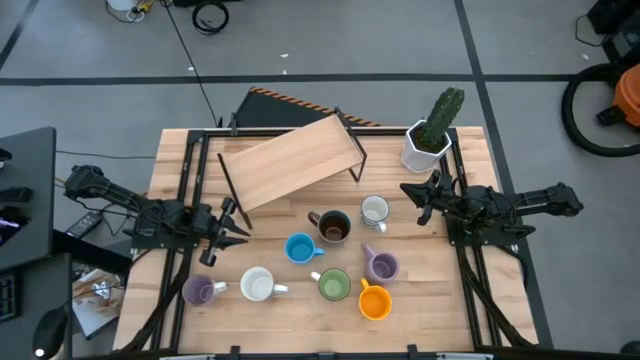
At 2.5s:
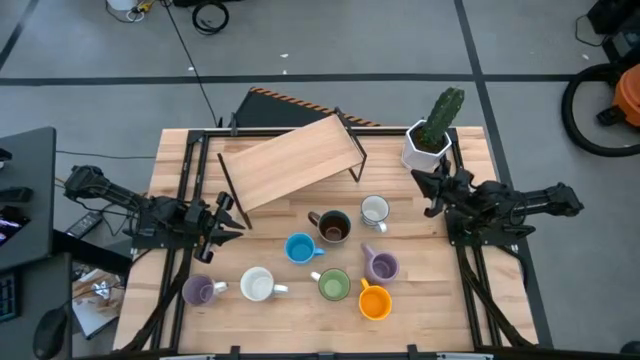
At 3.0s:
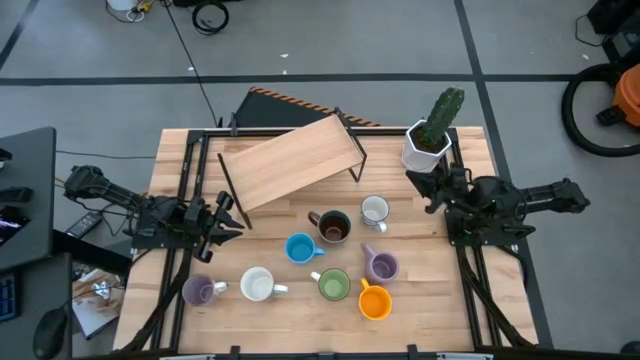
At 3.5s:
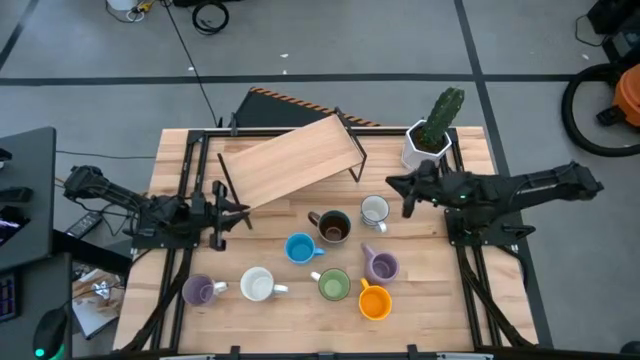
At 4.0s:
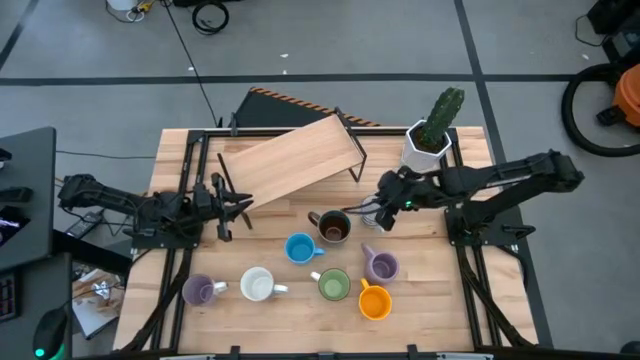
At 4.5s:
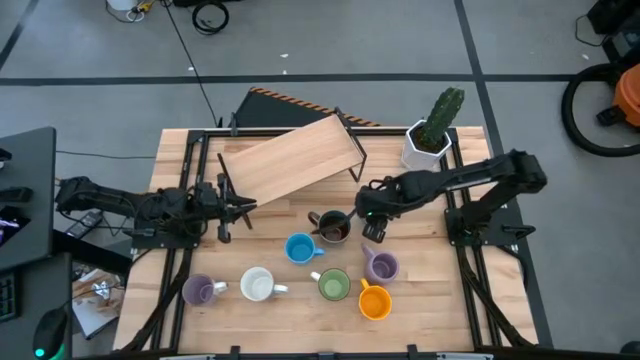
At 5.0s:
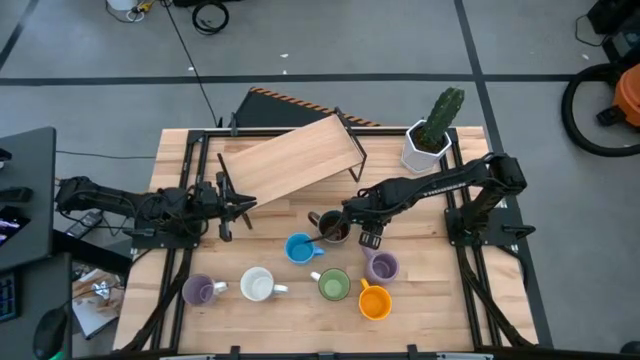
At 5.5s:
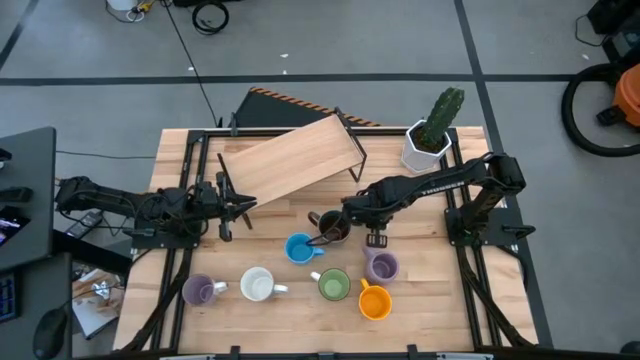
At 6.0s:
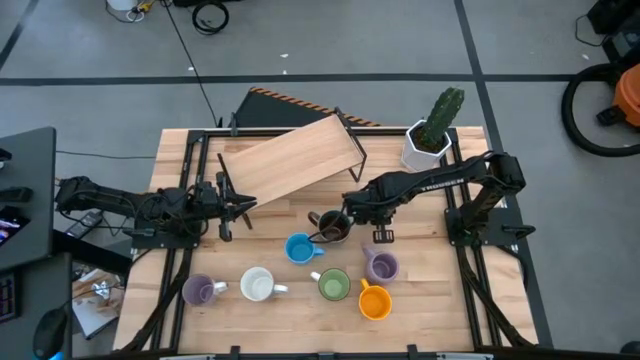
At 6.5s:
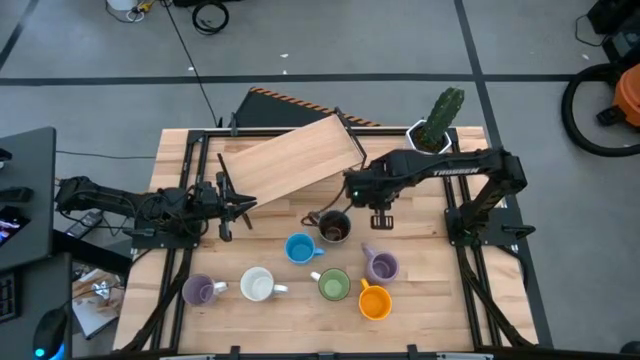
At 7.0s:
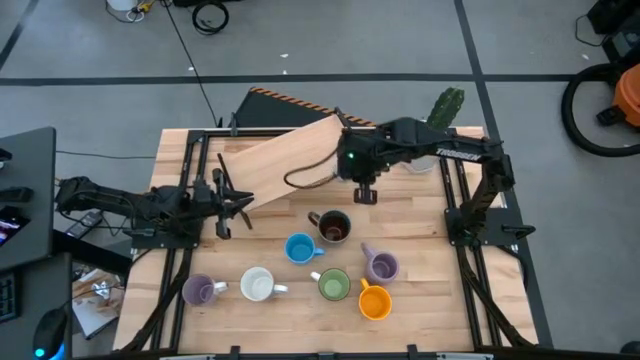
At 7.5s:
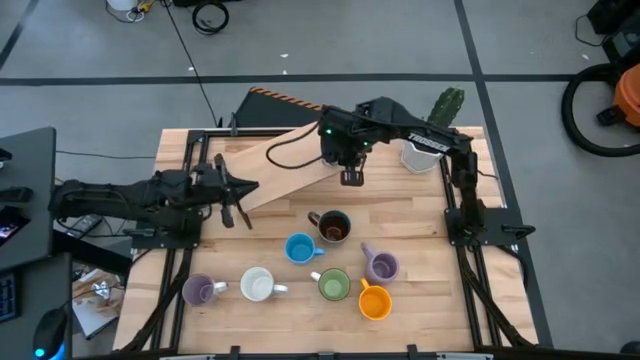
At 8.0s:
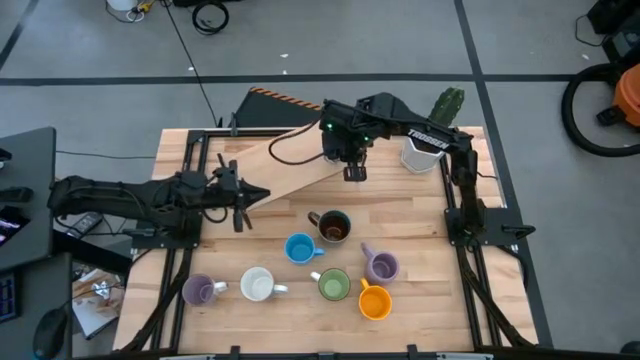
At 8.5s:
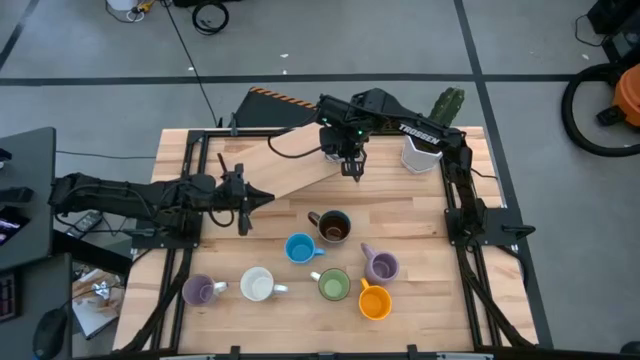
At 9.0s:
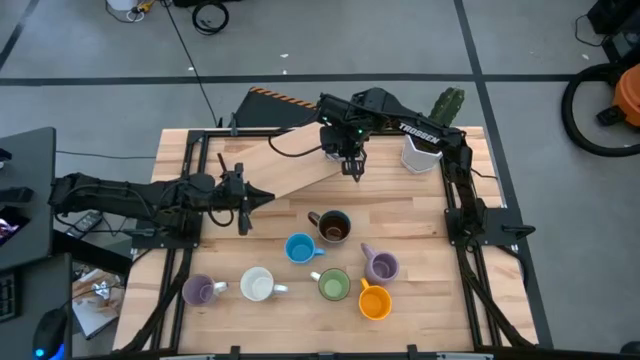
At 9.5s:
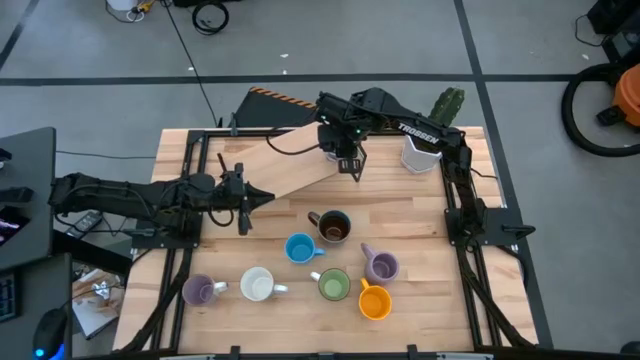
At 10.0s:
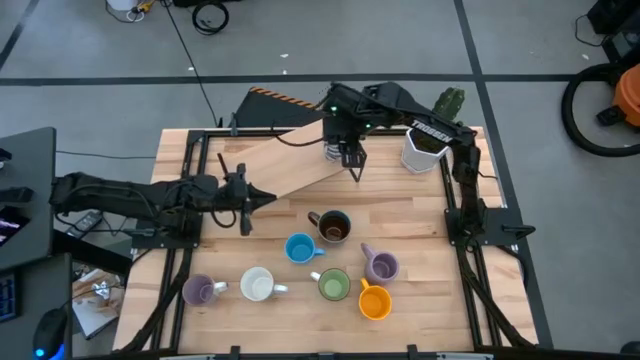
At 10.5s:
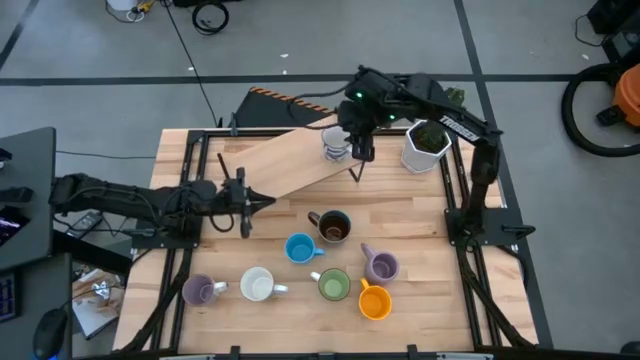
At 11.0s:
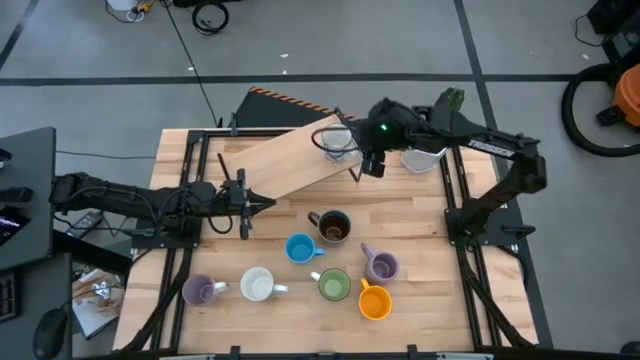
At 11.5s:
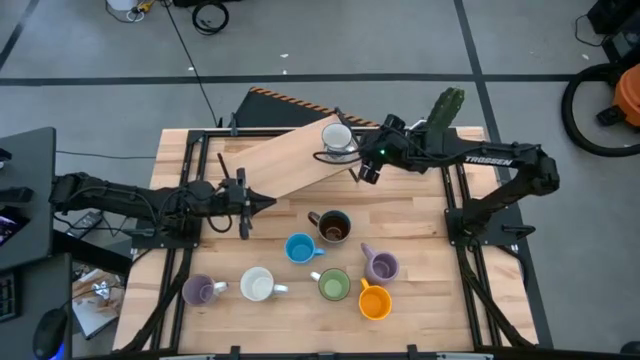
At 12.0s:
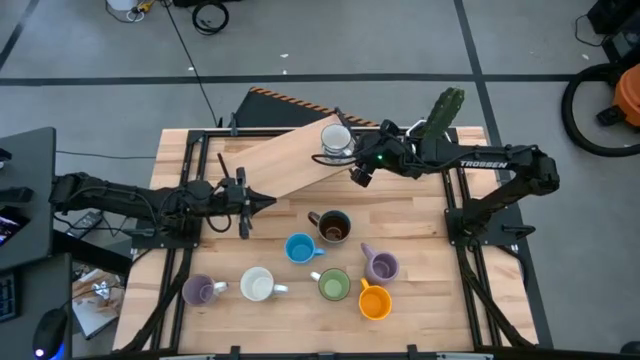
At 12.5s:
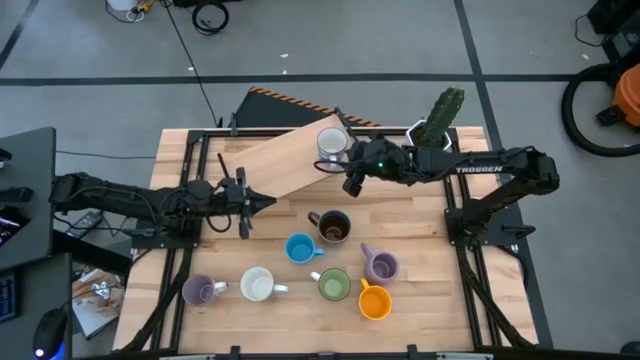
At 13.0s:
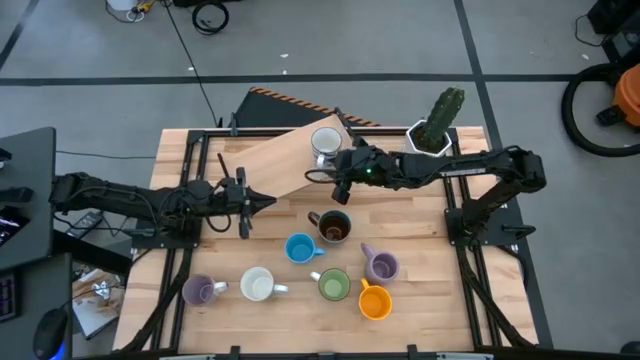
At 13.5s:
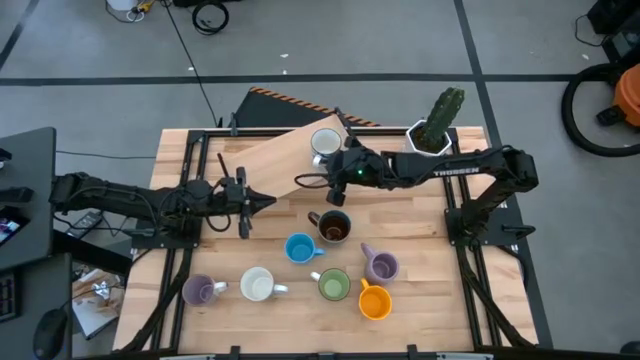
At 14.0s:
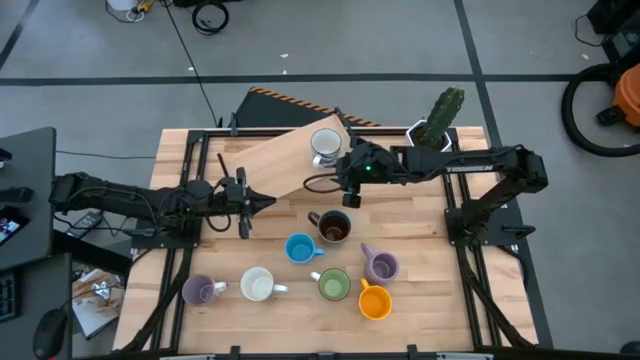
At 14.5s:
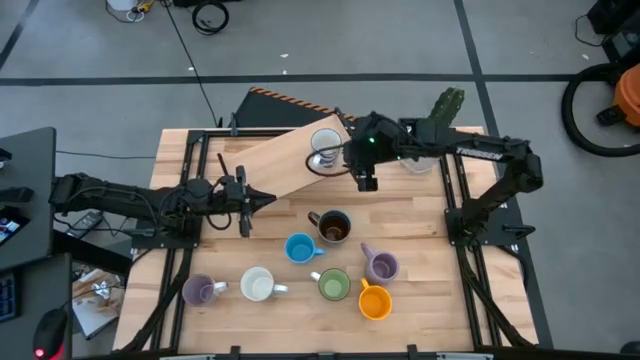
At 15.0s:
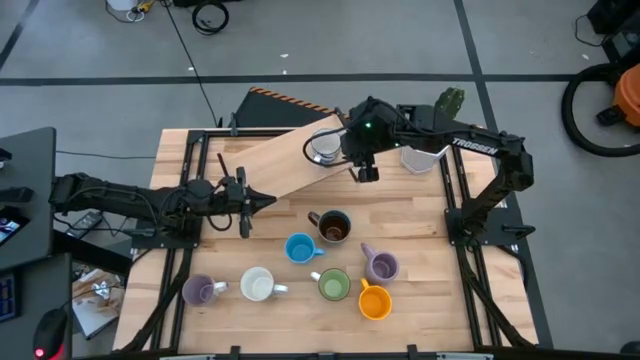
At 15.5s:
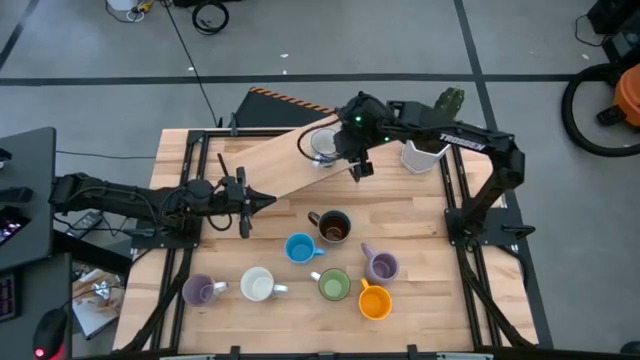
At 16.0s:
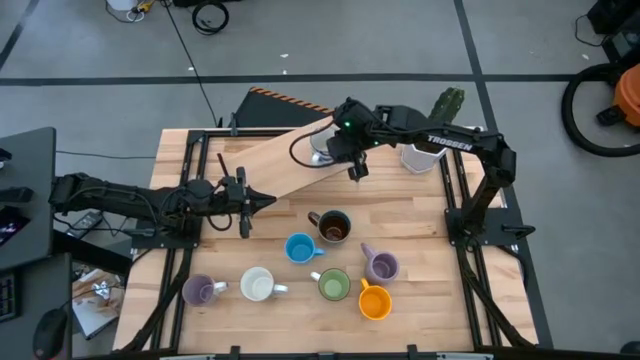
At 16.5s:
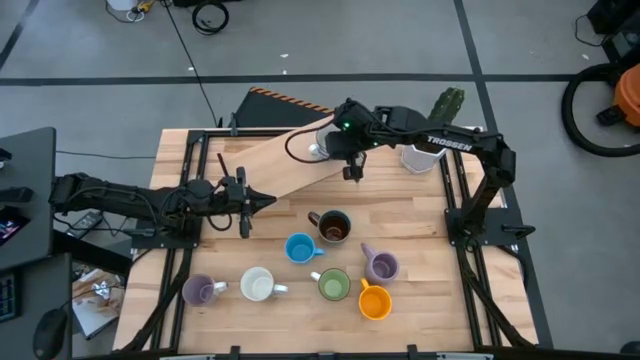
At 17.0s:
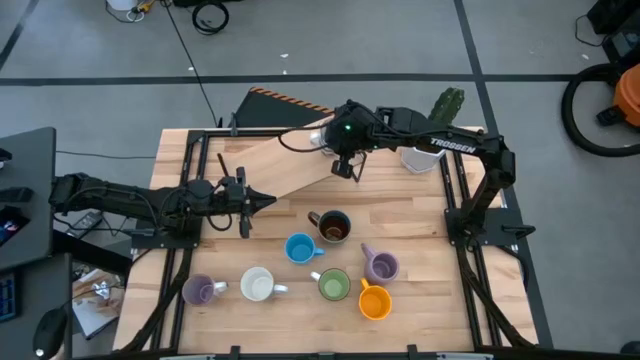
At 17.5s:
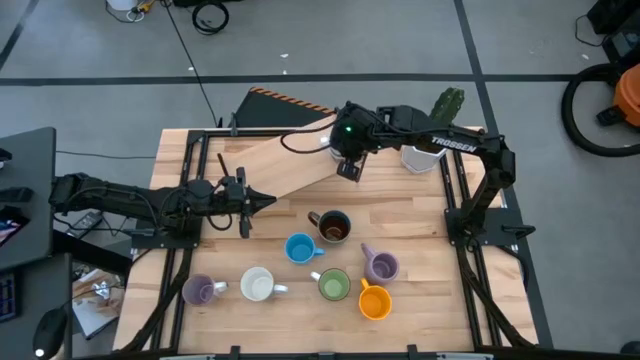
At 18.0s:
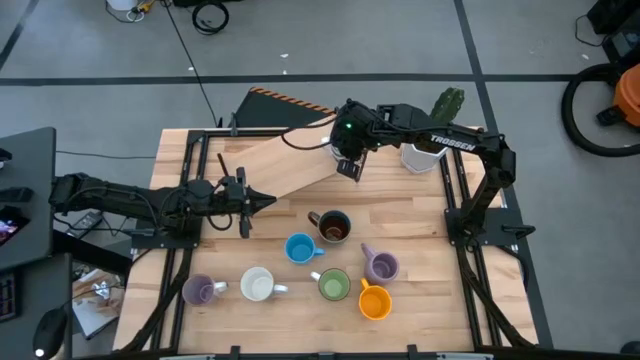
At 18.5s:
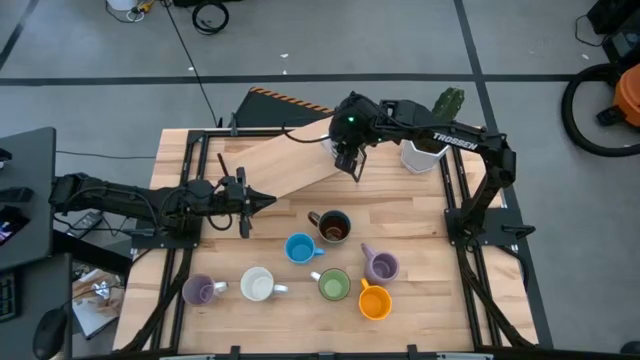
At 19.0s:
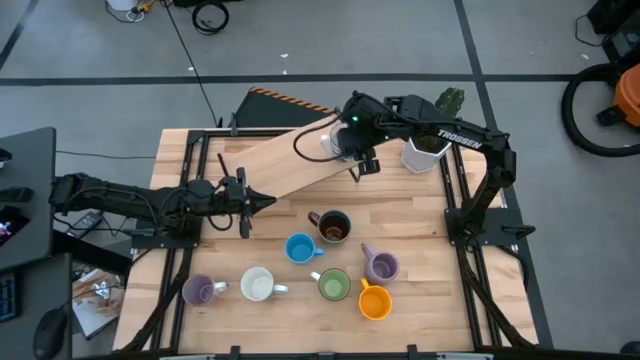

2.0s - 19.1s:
Task: Place coffee mugs
Put the pattern white mug on the shelf
